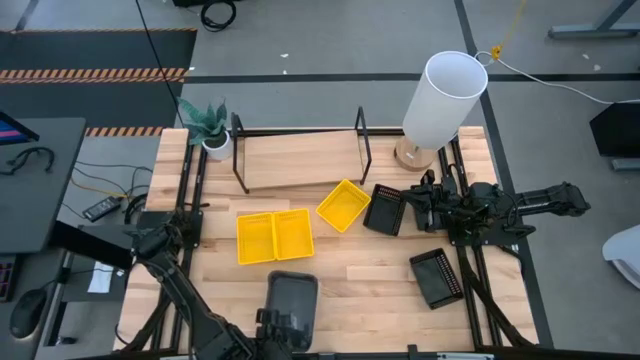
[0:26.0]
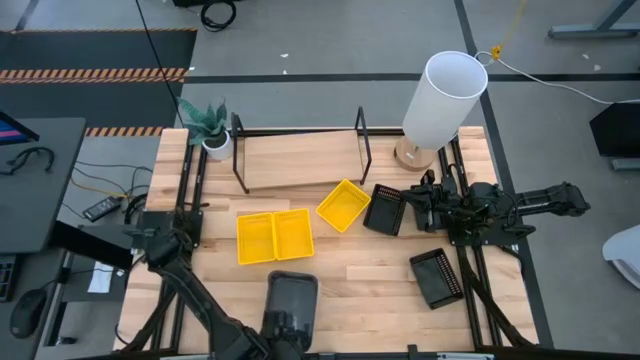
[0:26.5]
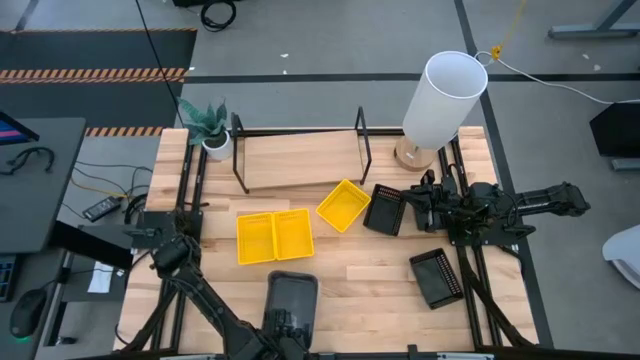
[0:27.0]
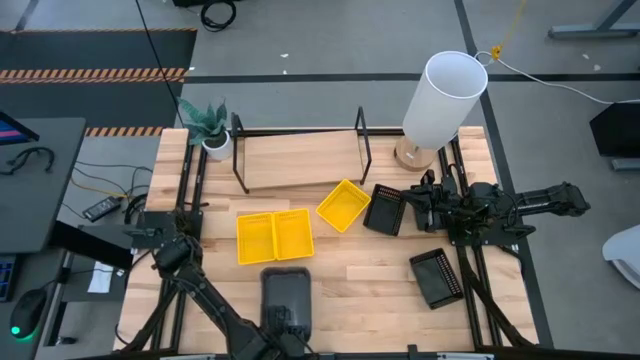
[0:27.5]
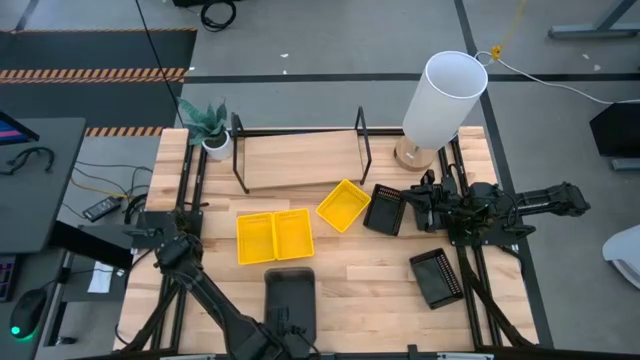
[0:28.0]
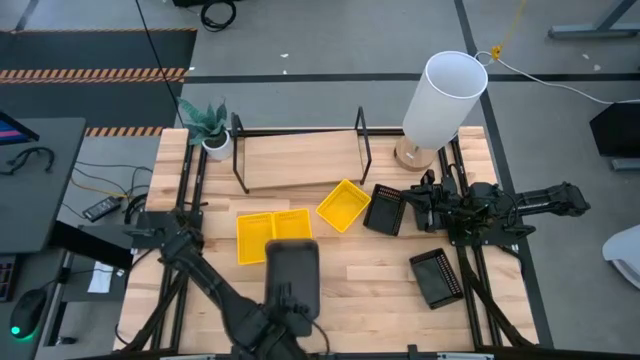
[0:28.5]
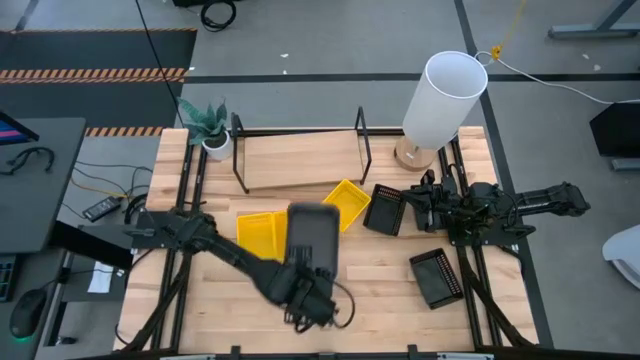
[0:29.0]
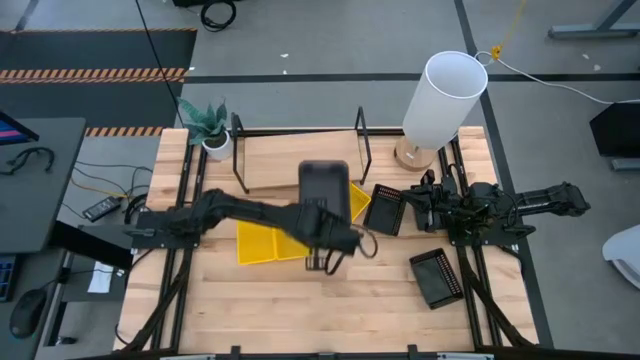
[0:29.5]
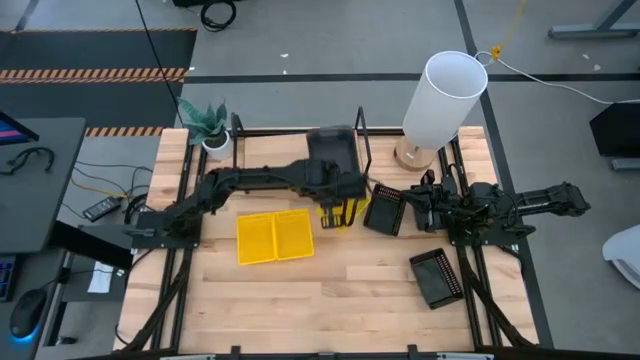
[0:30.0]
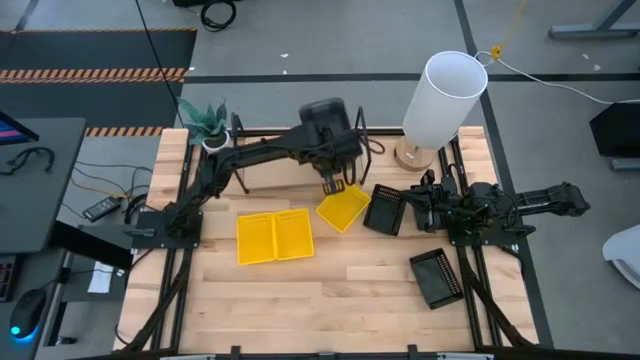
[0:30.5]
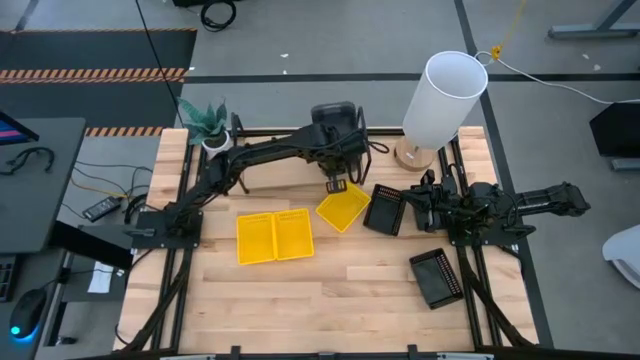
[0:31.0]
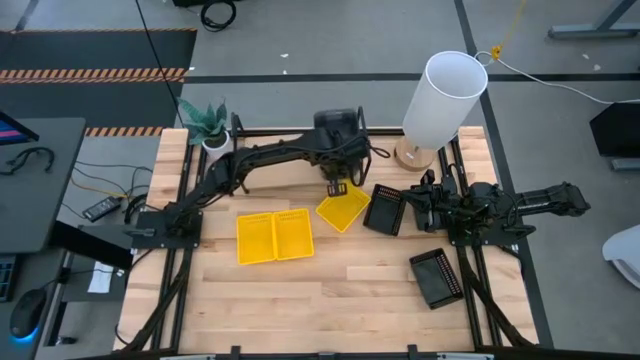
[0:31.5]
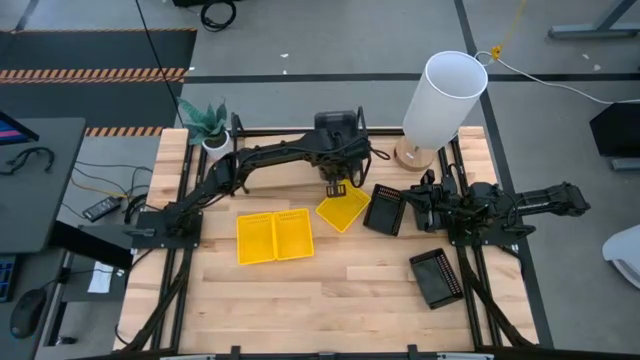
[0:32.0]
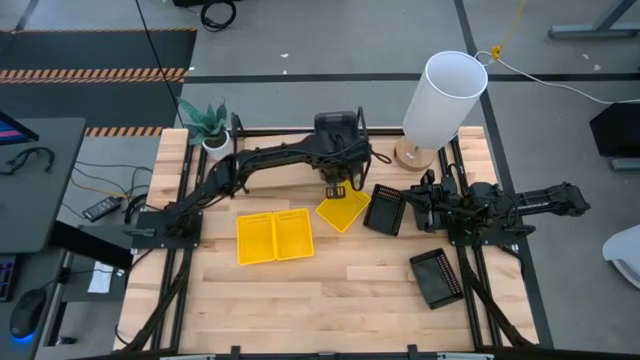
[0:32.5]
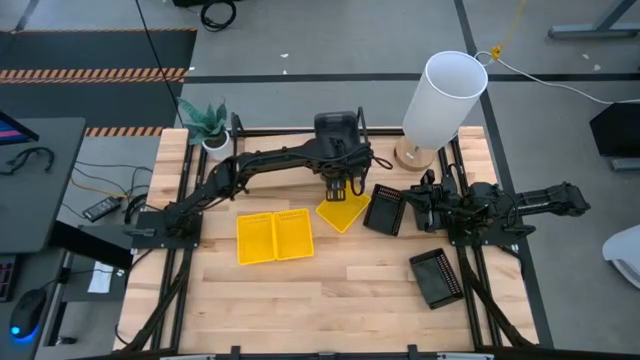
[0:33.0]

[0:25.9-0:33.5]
Task: Stack baskets on shelf by color
Put the stacked large black bins on the shelf

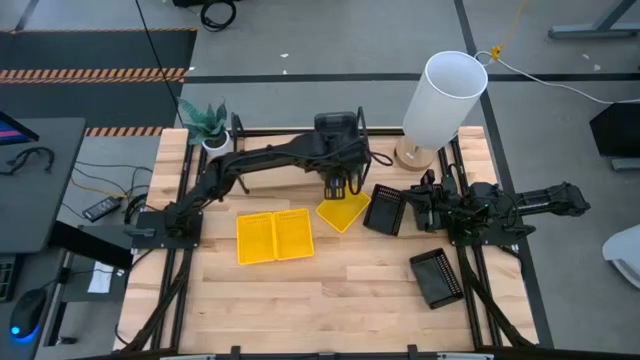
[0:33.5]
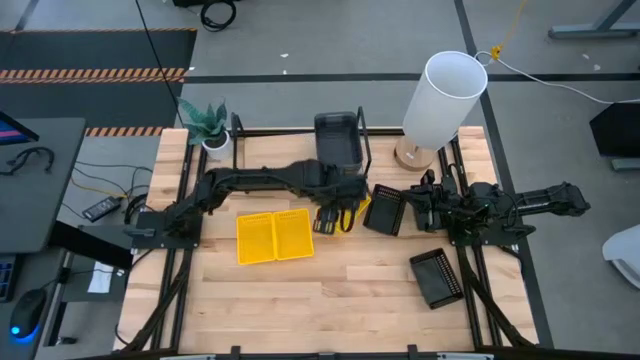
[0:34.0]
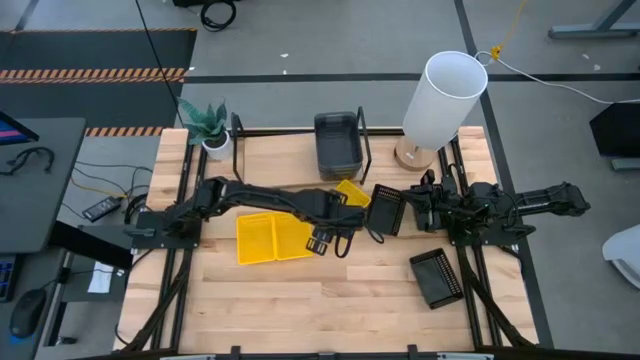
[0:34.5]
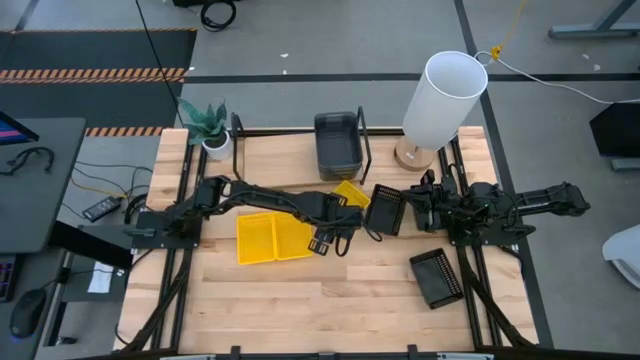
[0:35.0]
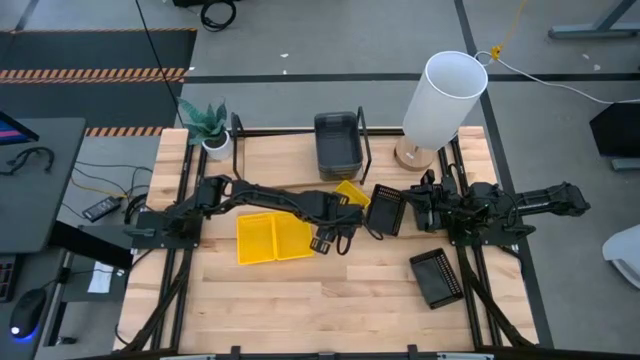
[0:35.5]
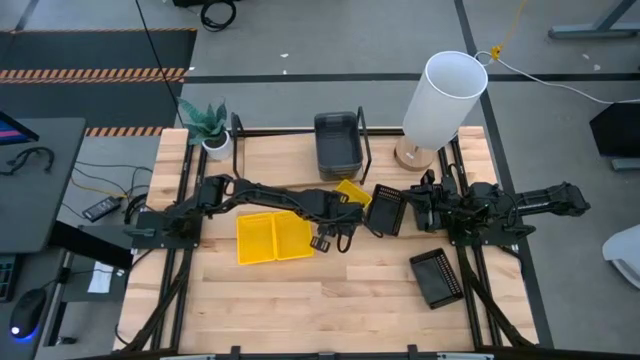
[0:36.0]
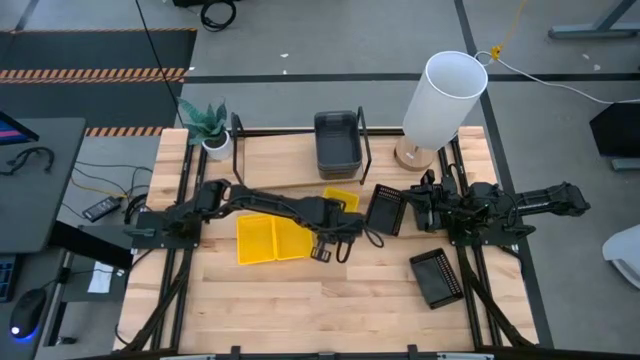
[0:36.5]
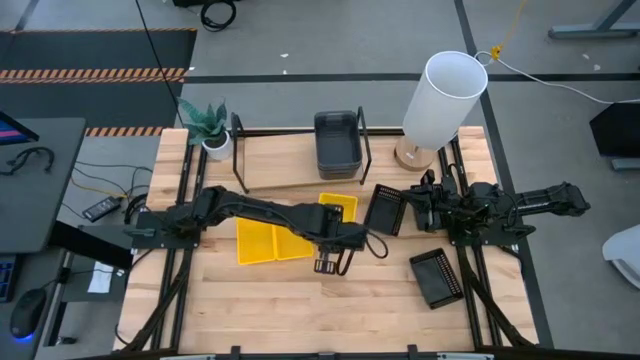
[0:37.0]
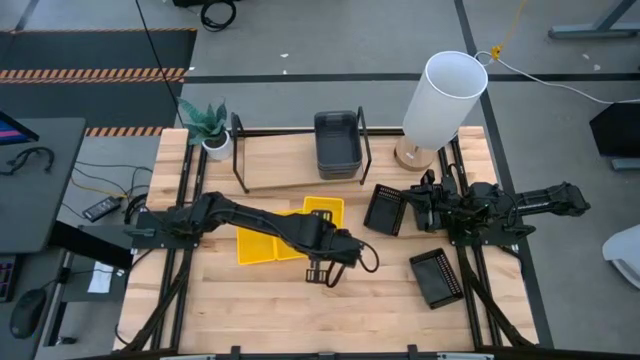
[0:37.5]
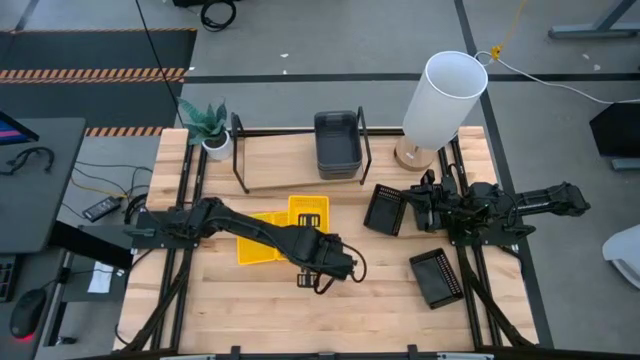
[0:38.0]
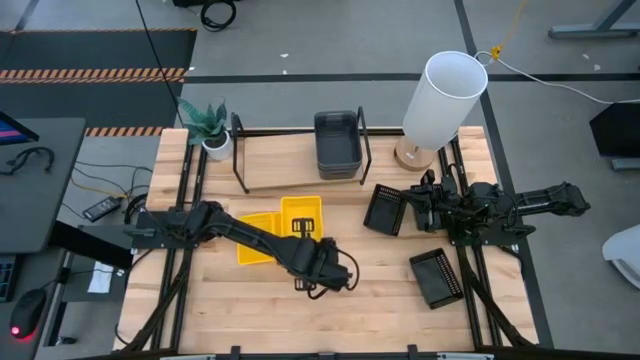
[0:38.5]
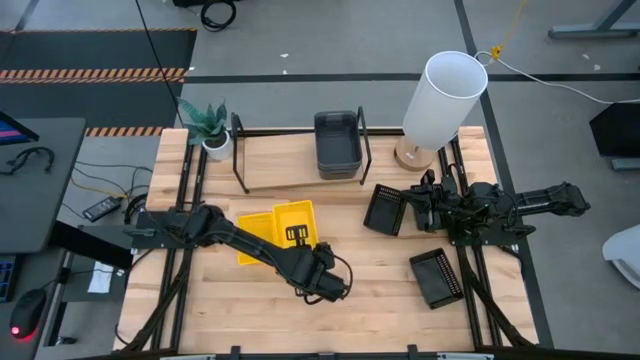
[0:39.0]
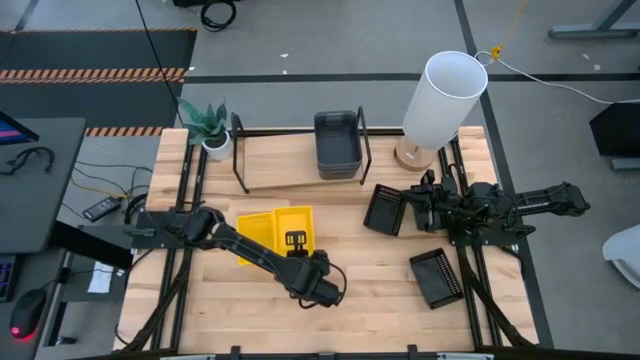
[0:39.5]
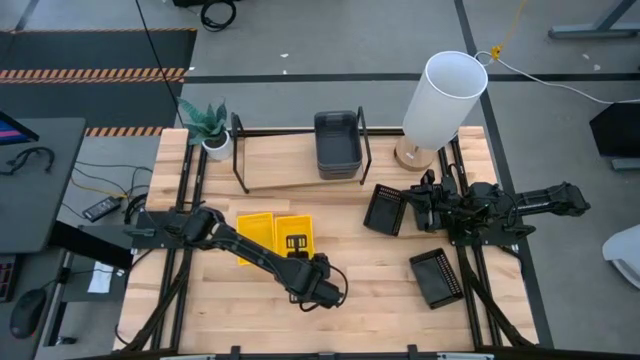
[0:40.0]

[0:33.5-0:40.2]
Stack the right yellow bin on top of the middle yellow bin

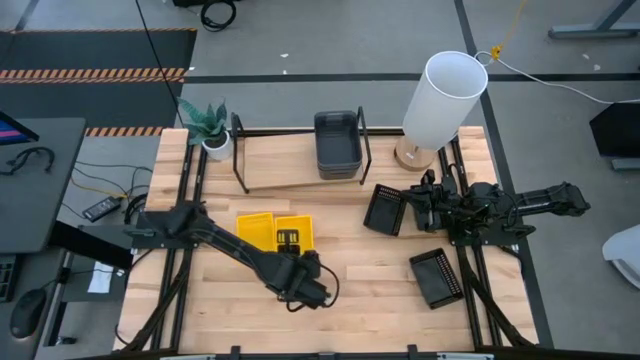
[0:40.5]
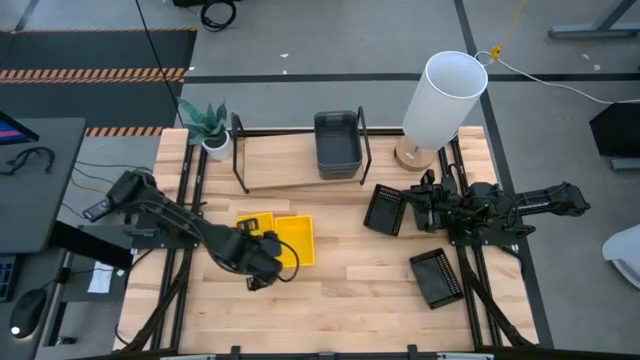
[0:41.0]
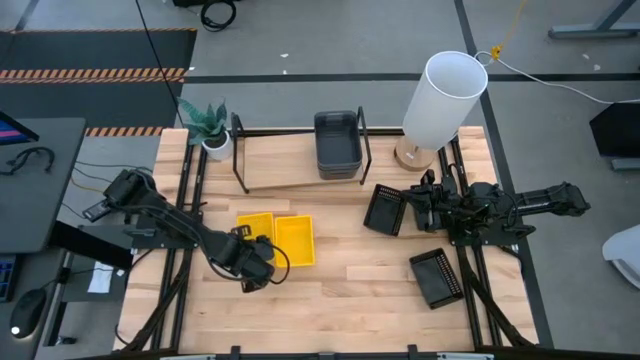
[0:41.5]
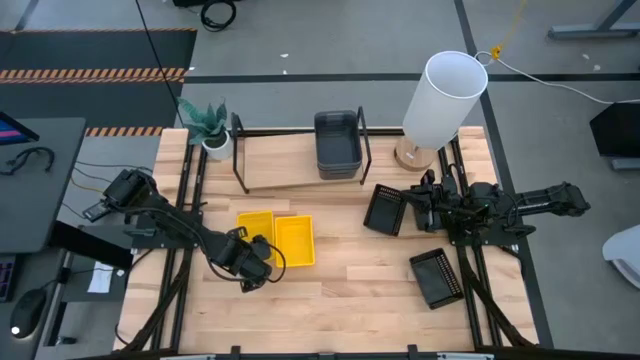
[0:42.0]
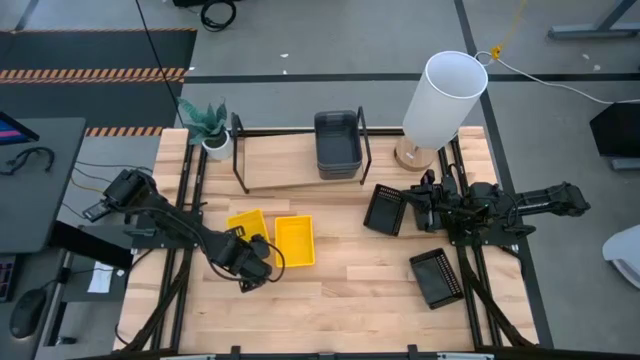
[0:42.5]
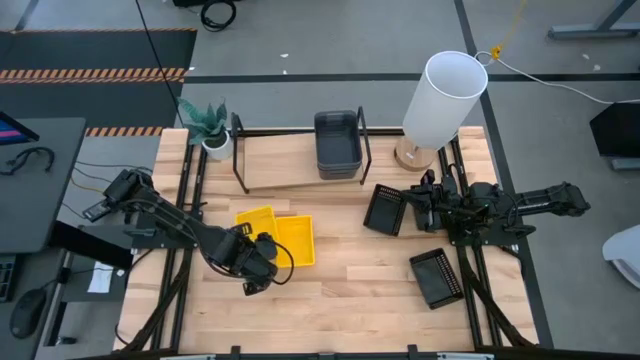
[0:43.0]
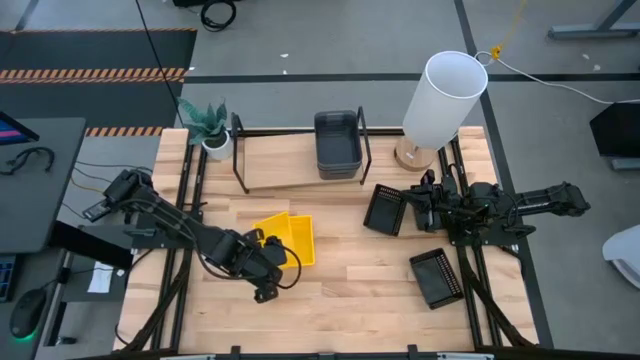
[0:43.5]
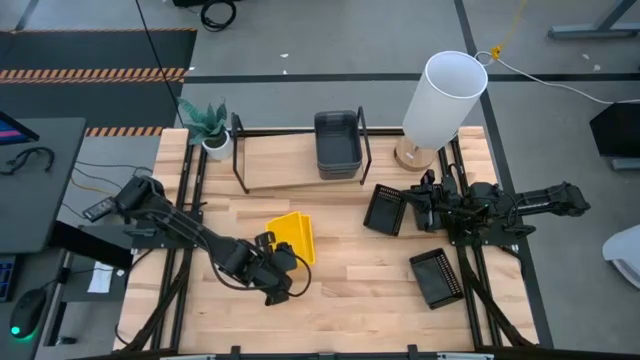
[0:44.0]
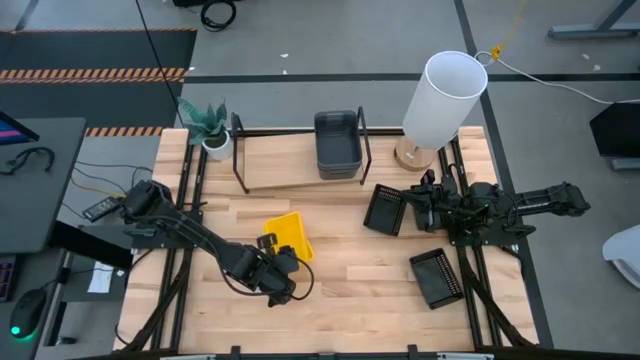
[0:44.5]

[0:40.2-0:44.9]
Stack the left yellow bin on top of the right yellow bin

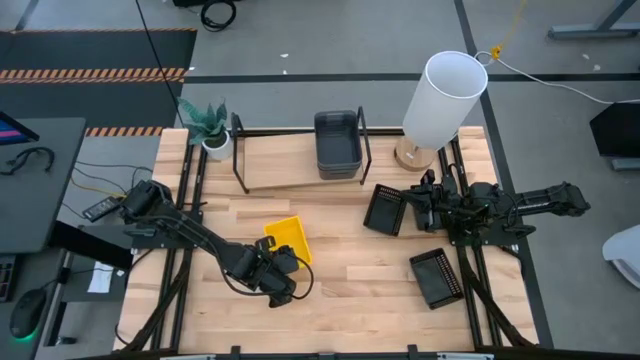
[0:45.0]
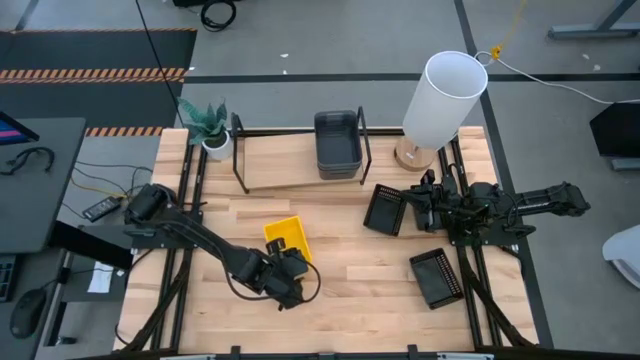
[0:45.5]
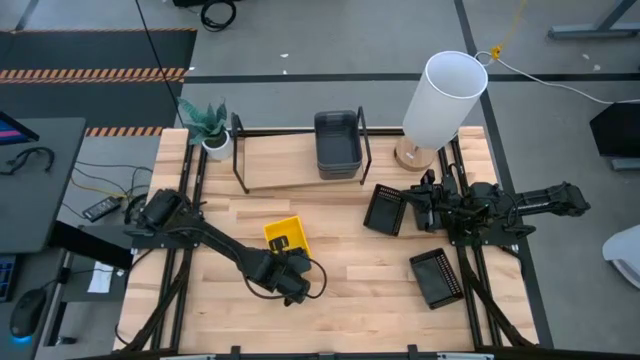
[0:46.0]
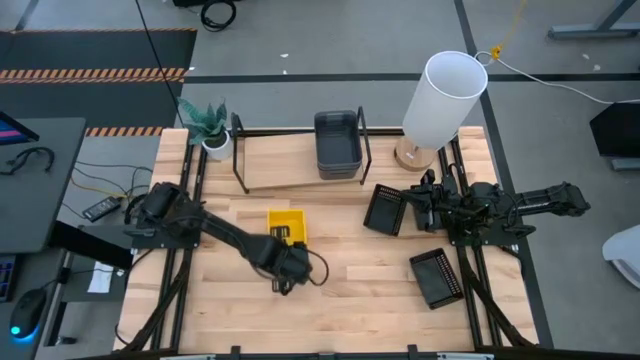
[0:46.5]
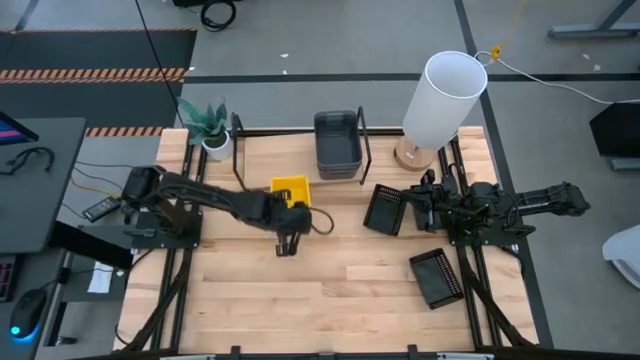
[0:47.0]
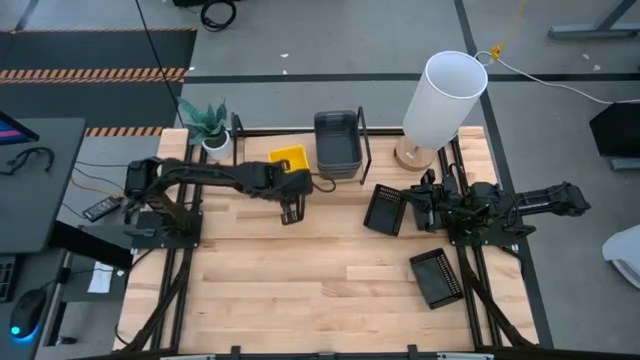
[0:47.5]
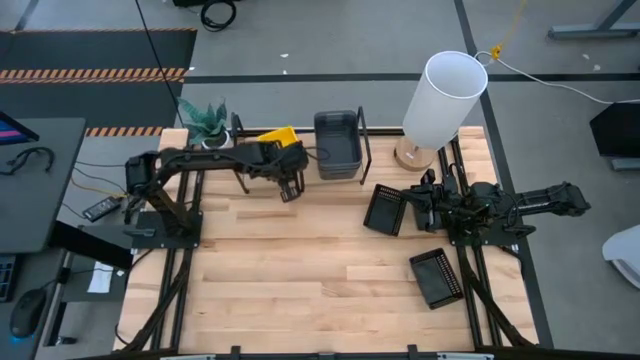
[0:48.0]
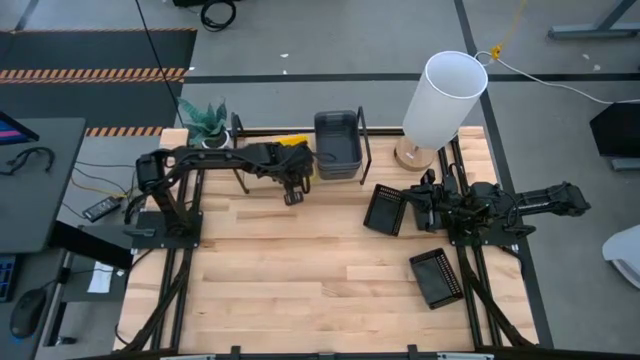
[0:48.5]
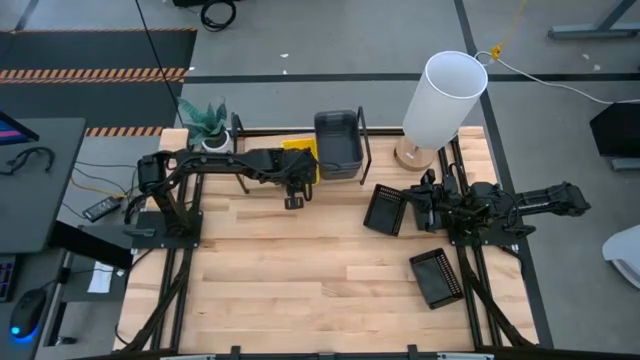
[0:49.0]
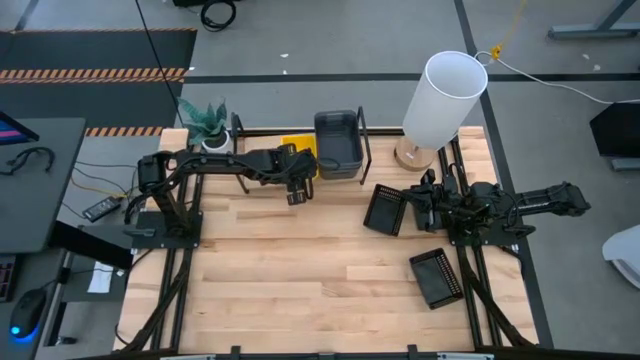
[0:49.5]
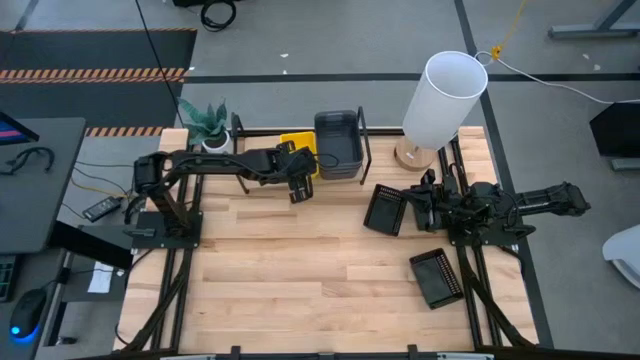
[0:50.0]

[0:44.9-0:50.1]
Put the stacked yellow bins on the shelf
